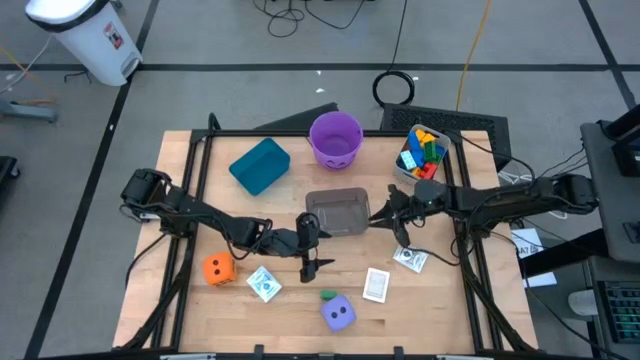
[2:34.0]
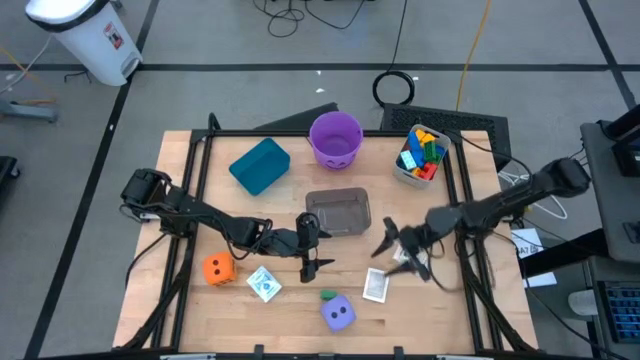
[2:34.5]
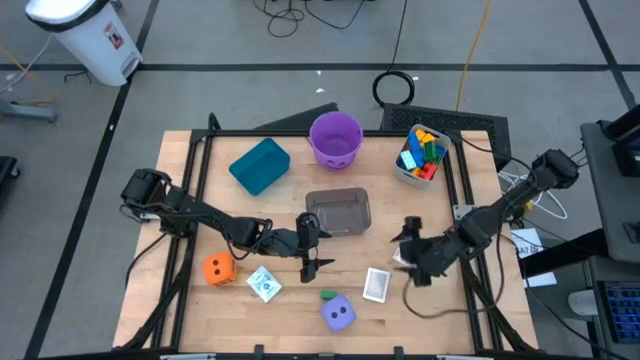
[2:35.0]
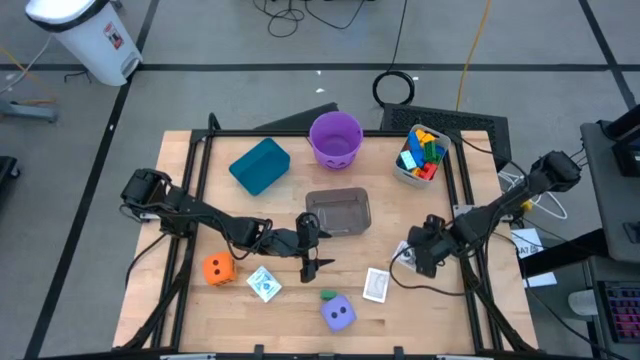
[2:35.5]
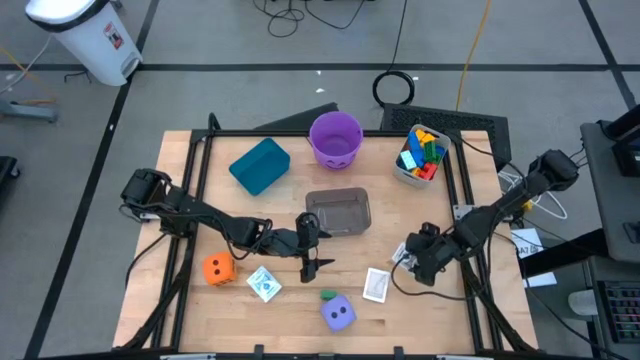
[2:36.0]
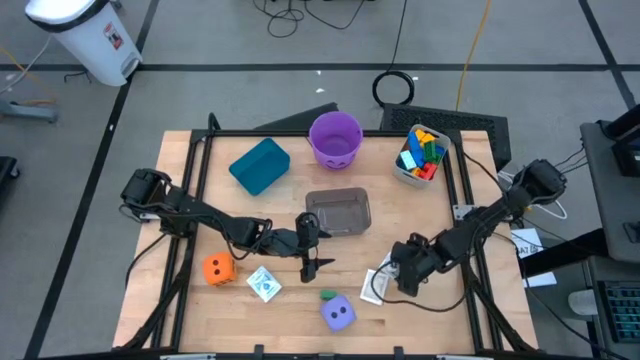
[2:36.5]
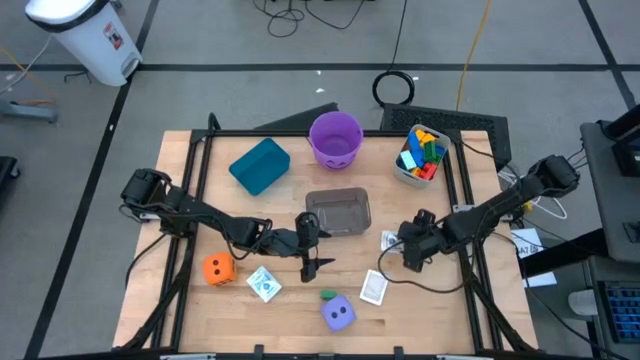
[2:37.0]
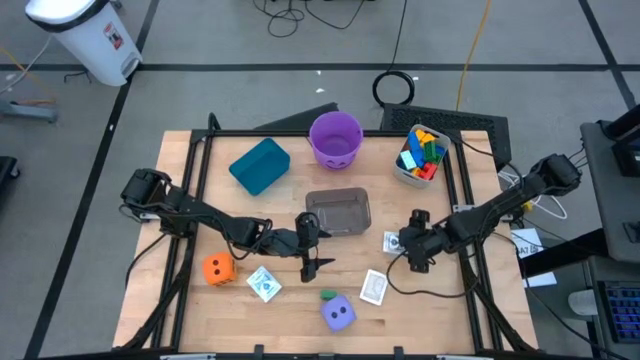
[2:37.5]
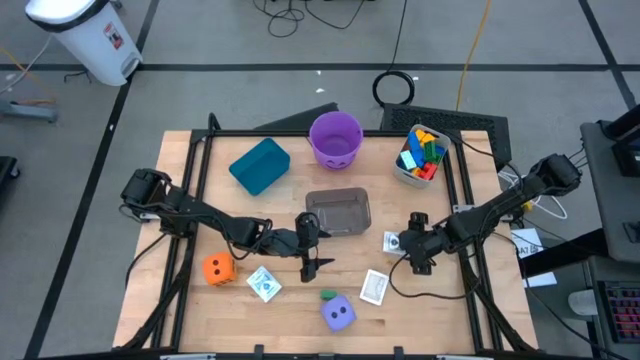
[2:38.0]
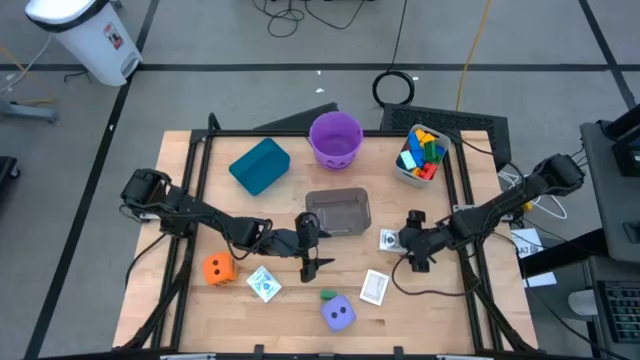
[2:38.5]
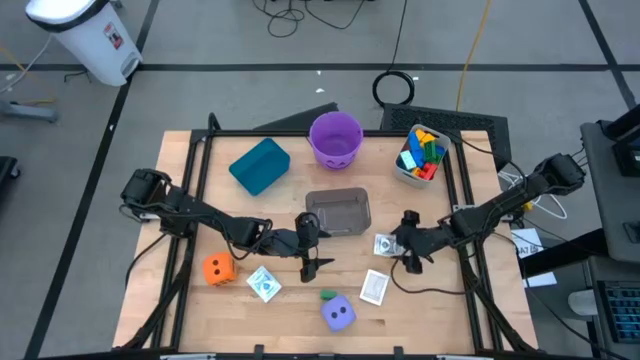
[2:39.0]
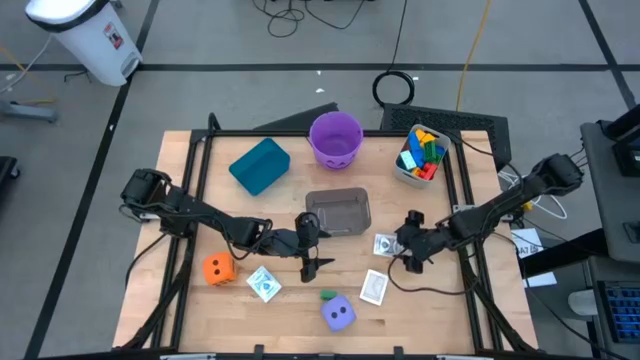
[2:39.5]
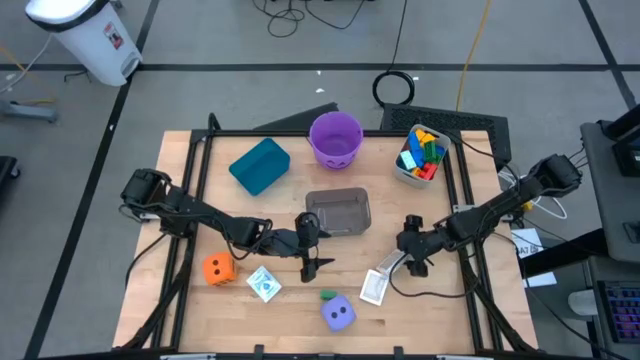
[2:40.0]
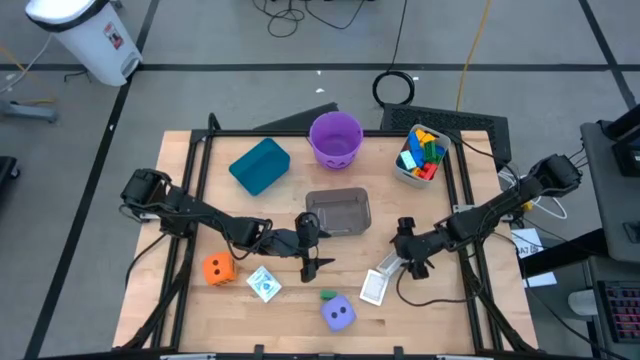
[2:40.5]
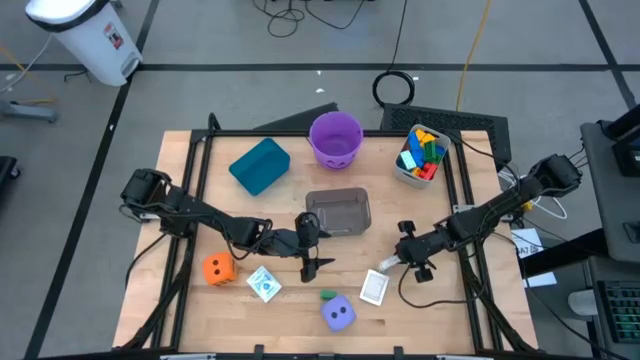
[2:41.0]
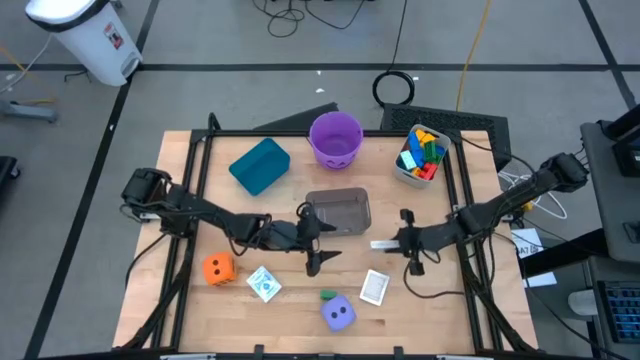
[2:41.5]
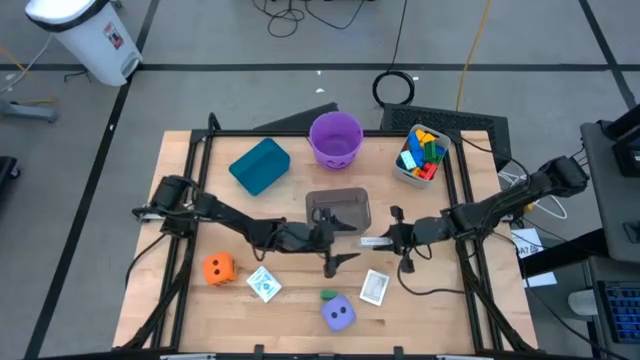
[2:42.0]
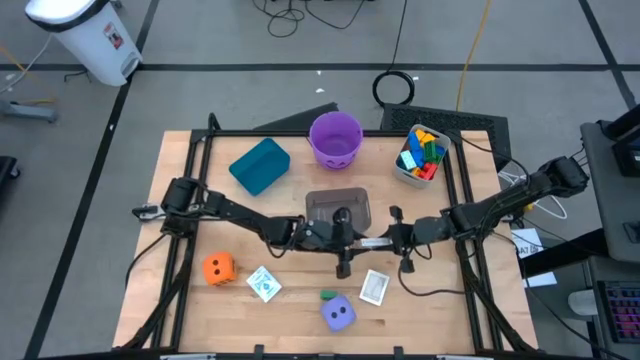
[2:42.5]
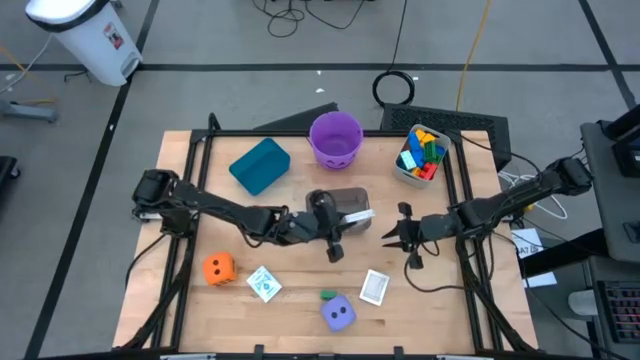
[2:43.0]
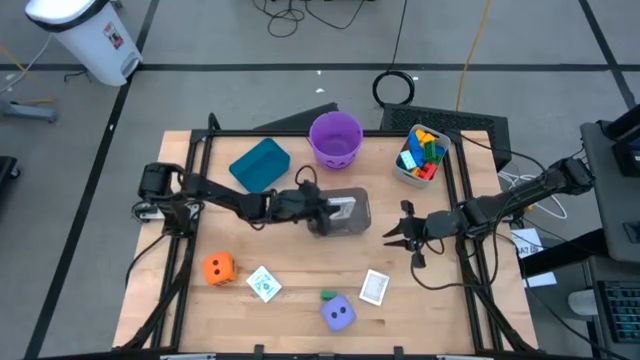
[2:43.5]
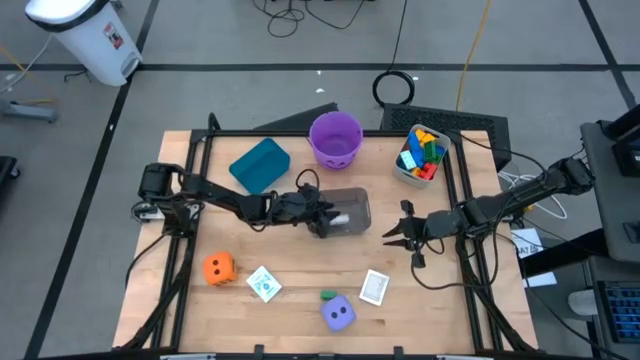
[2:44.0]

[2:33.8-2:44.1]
Task: Pick & Place Toys
Put the black deck of cards into the transparent black bin

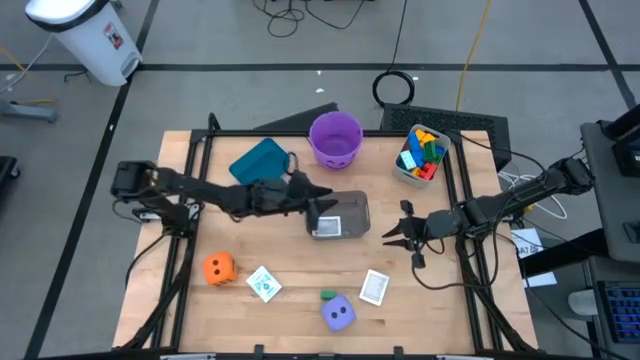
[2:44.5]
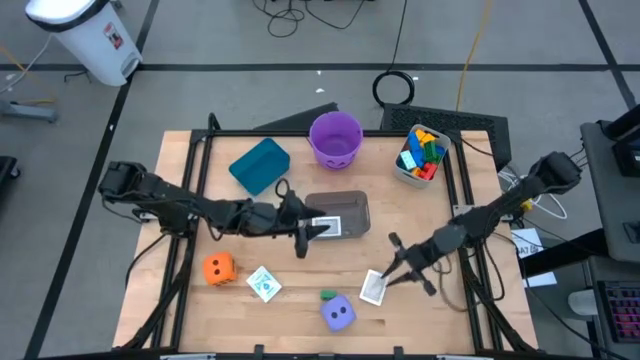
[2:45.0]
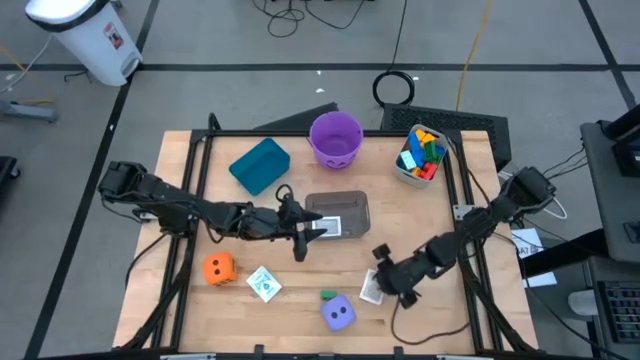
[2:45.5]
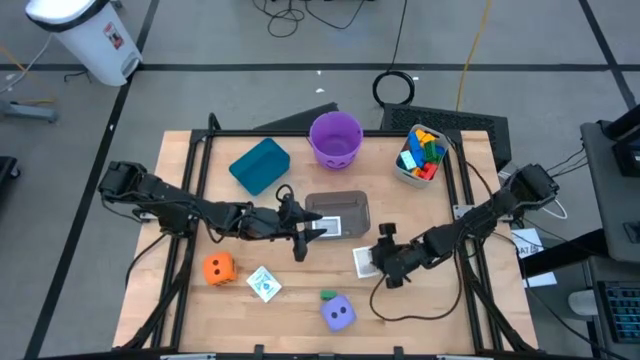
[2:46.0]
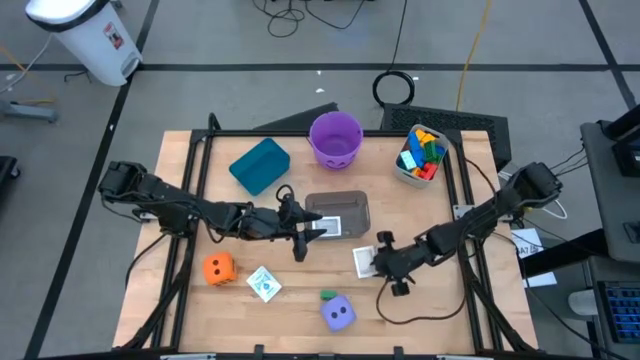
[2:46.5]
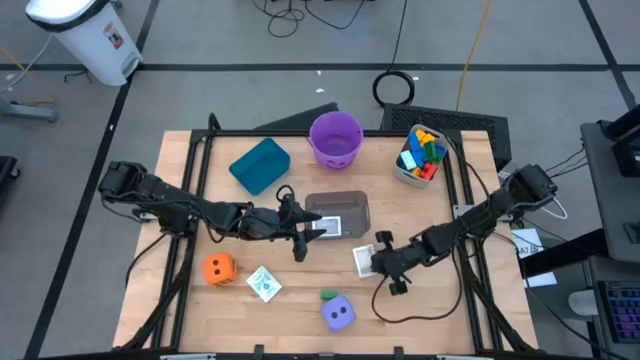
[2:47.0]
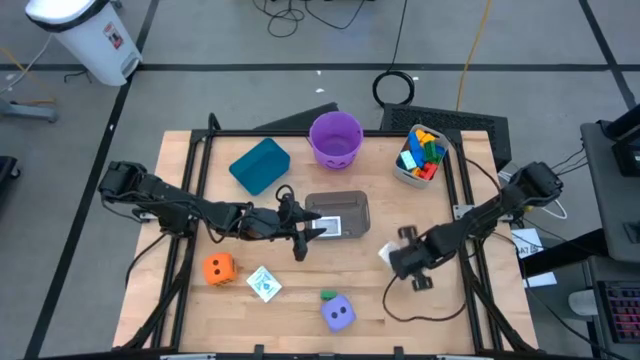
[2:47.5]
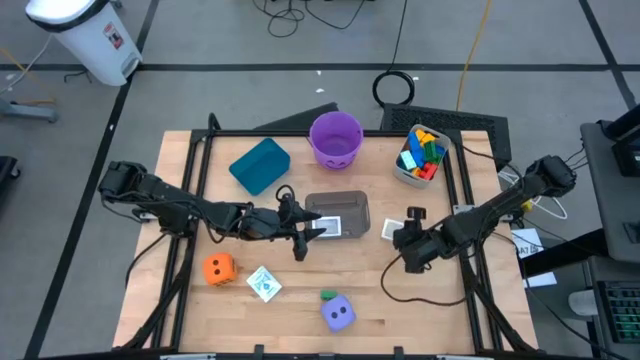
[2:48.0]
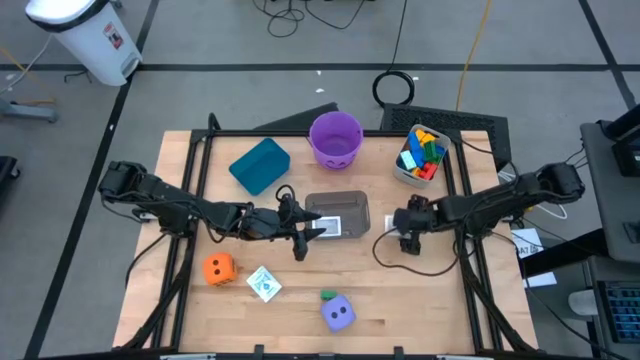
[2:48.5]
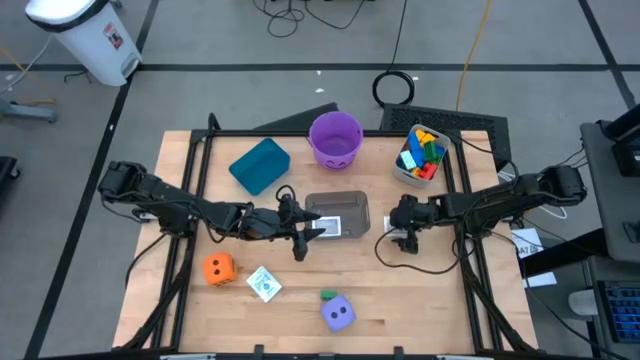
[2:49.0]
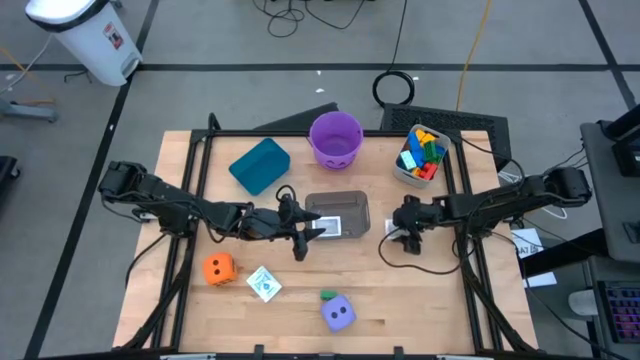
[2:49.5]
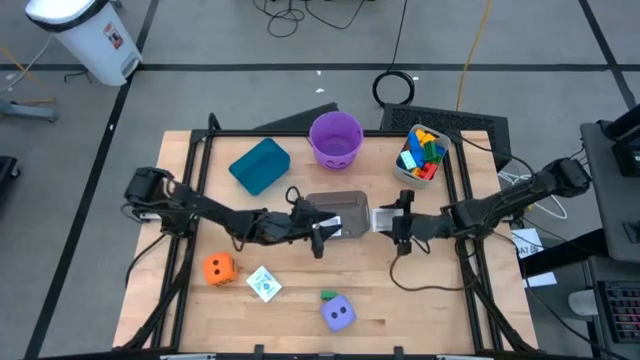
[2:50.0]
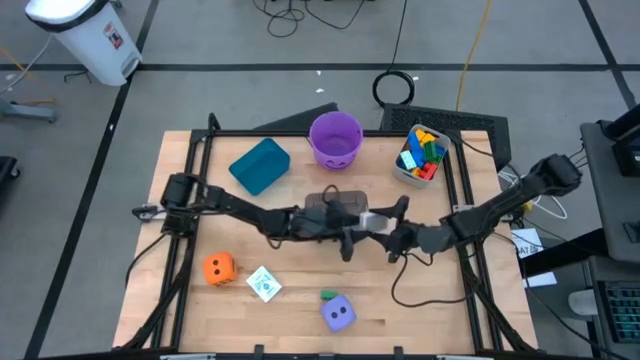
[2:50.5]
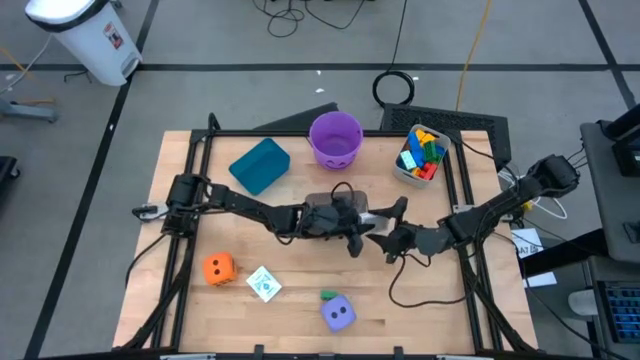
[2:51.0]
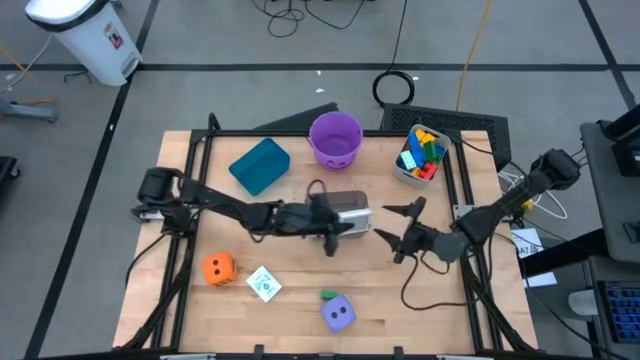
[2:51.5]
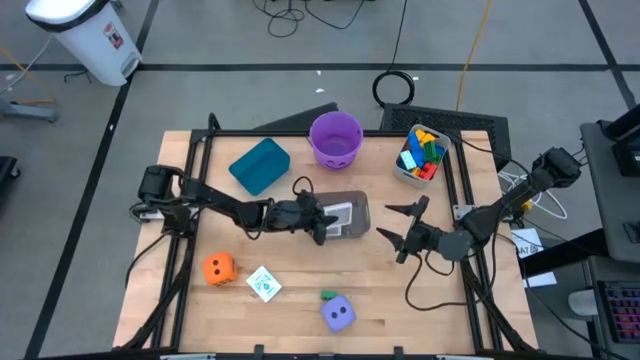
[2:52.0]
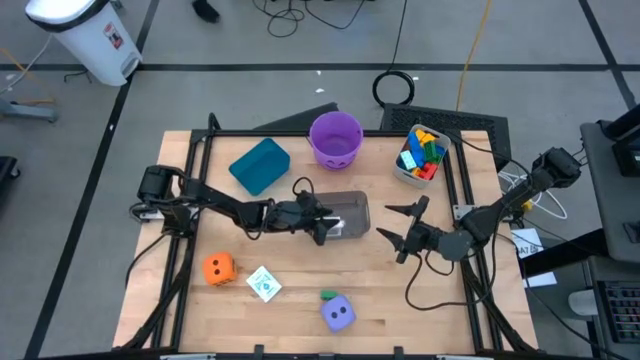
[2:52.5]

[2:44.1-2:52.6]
Put the brown deck of cards into the transparent black bin

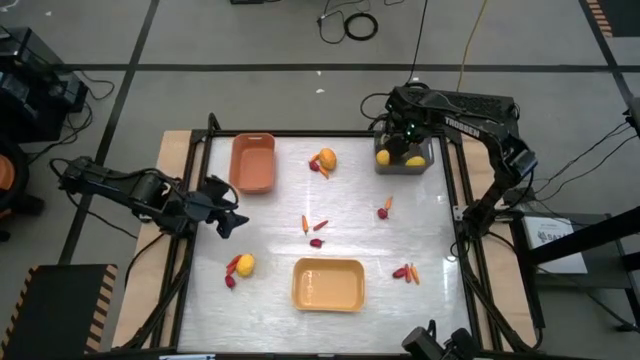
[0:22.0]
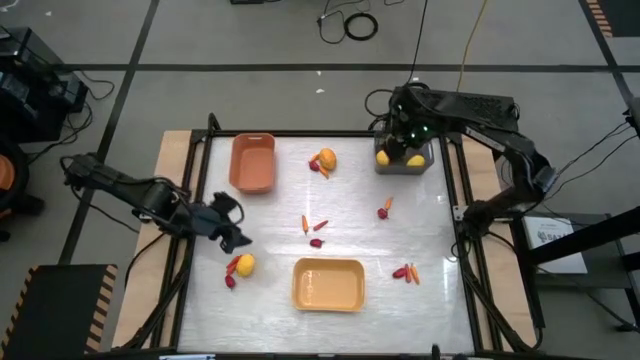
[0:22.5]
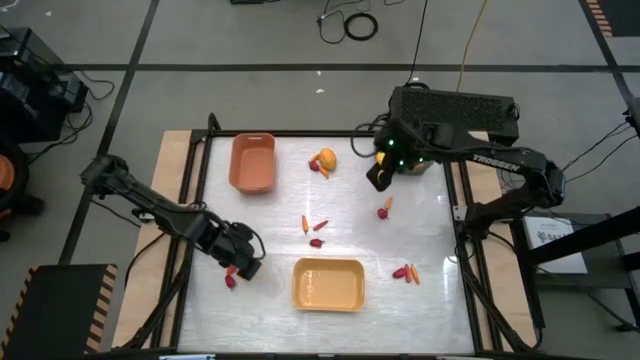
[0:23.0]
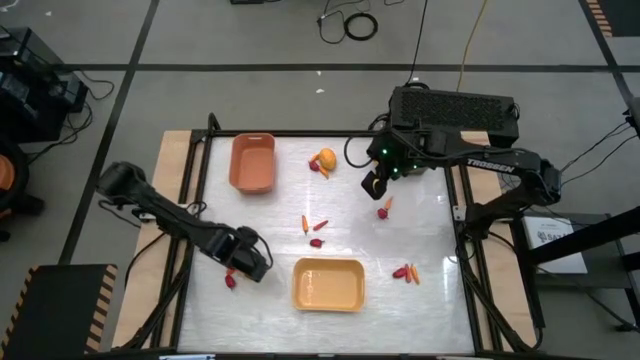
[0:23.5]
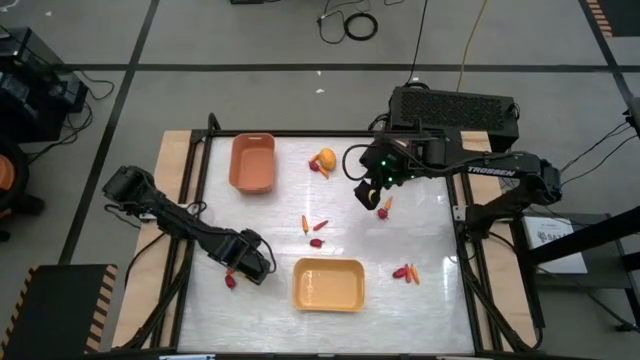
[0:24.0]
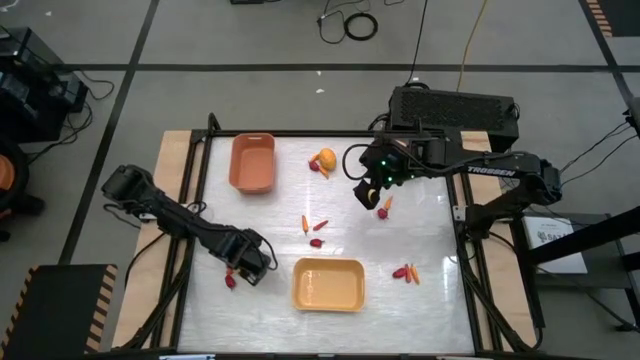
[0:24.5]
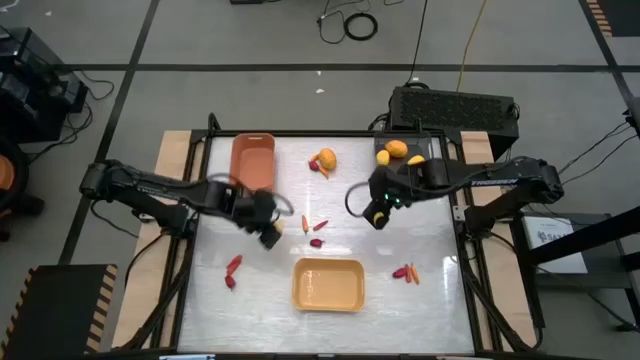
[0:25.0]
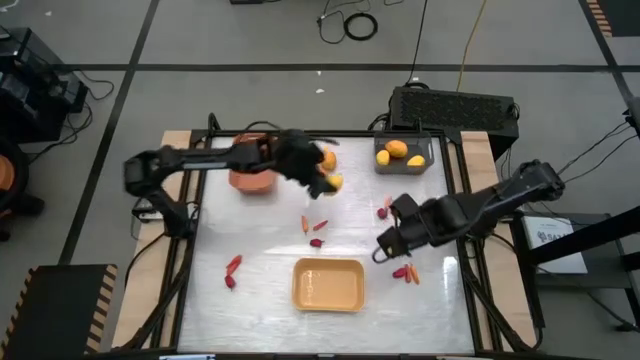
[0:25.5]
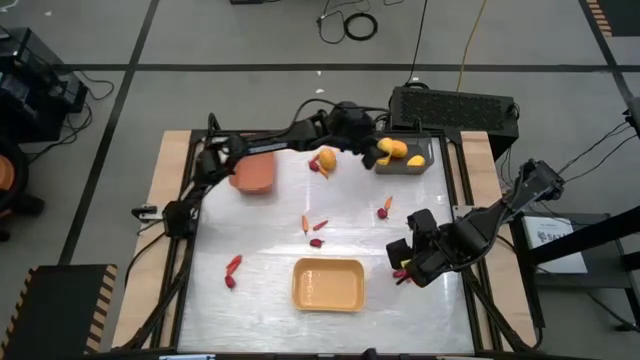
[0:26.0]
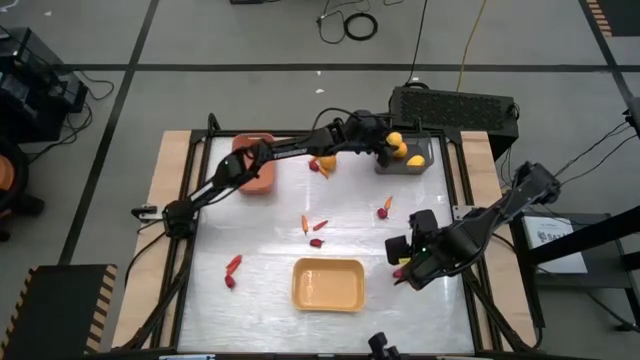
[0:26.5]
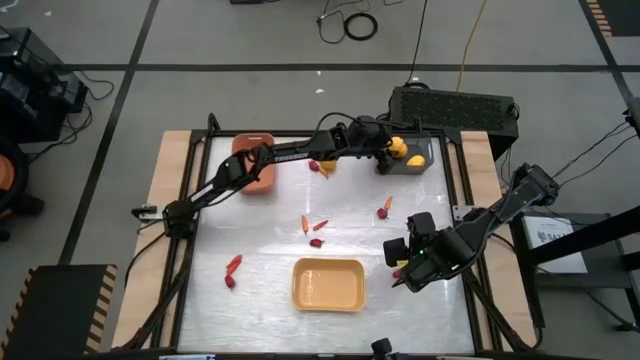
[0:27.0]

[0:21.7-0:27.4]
Task: Sort produce into baskets
Put the lemon into the gray bin
